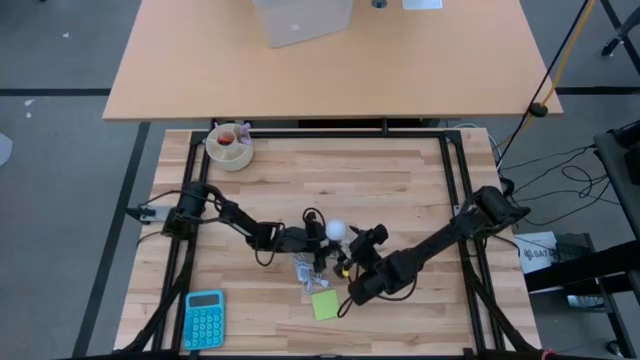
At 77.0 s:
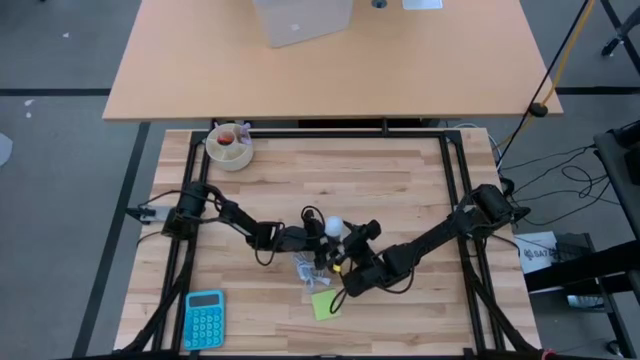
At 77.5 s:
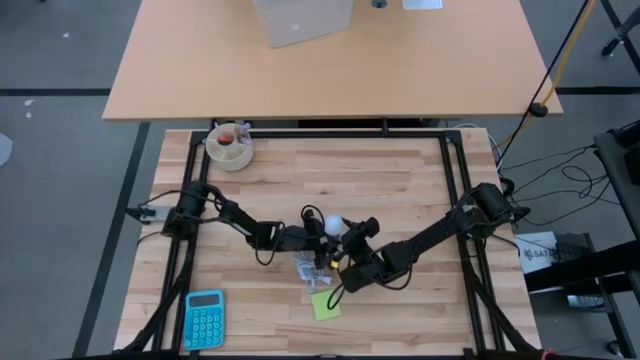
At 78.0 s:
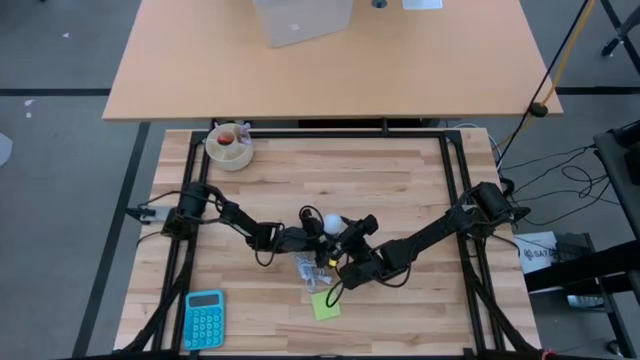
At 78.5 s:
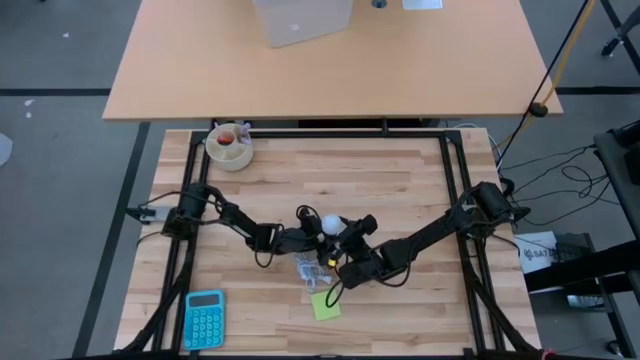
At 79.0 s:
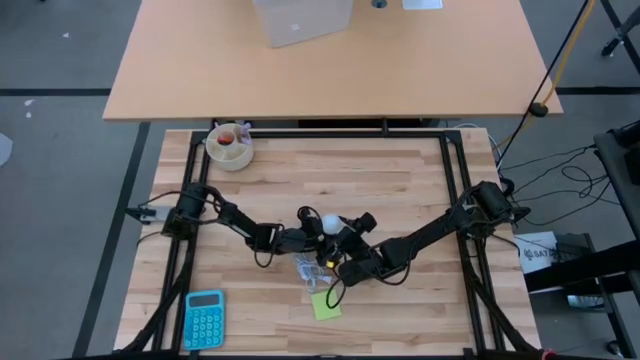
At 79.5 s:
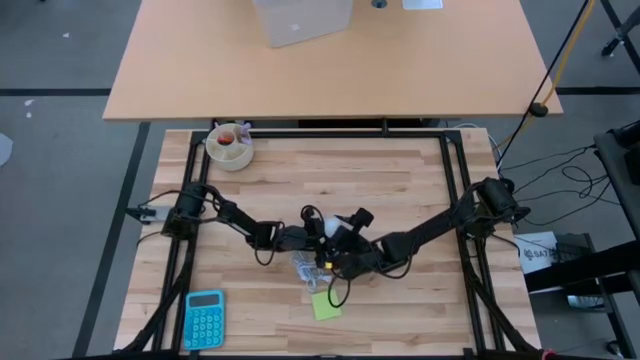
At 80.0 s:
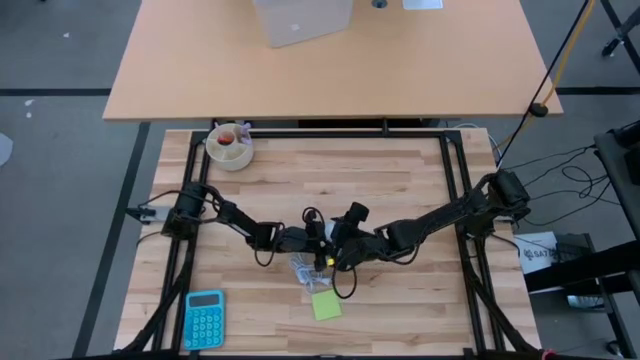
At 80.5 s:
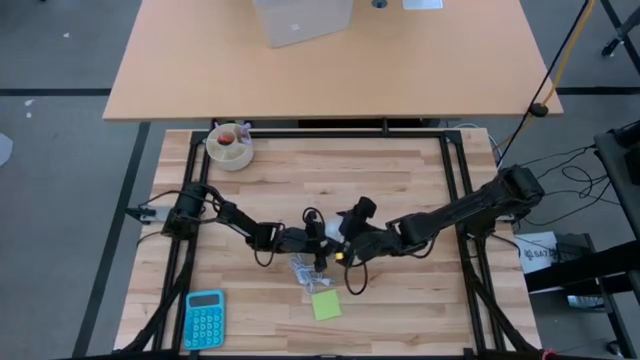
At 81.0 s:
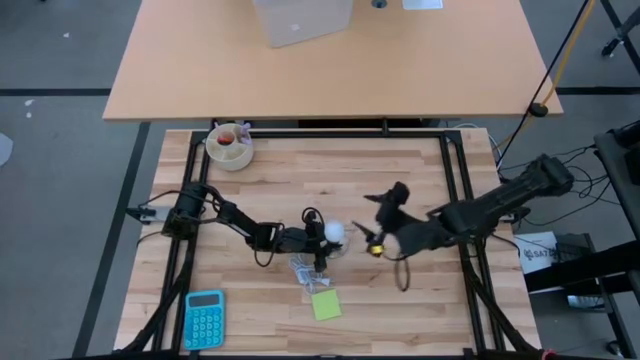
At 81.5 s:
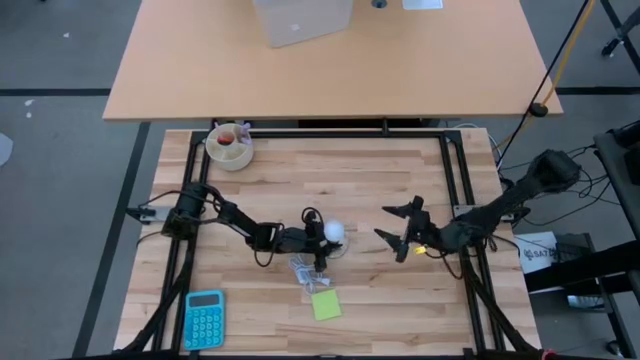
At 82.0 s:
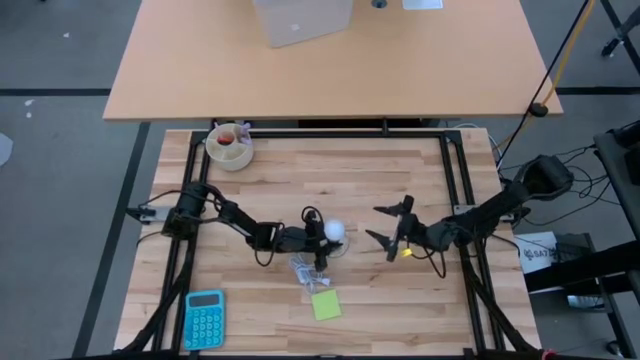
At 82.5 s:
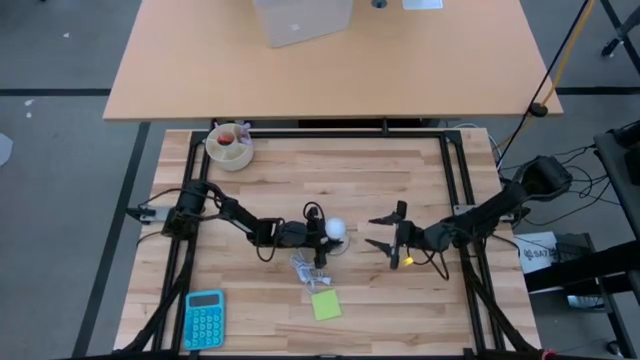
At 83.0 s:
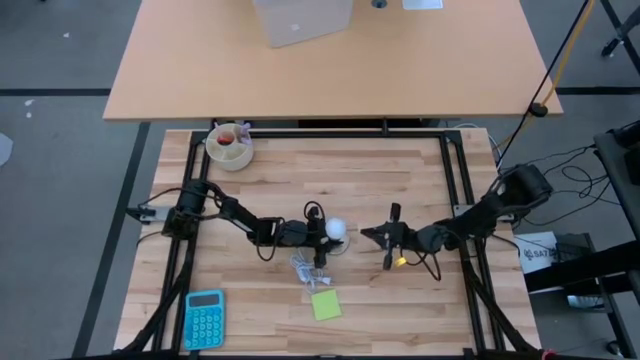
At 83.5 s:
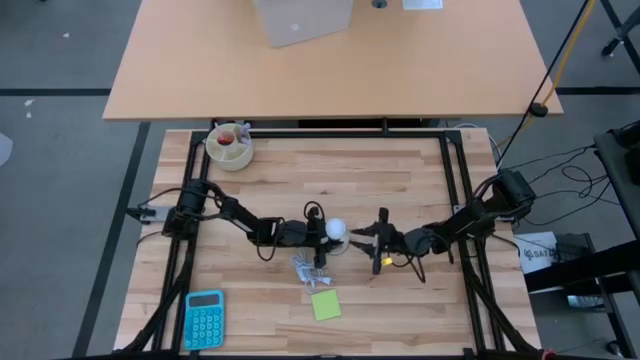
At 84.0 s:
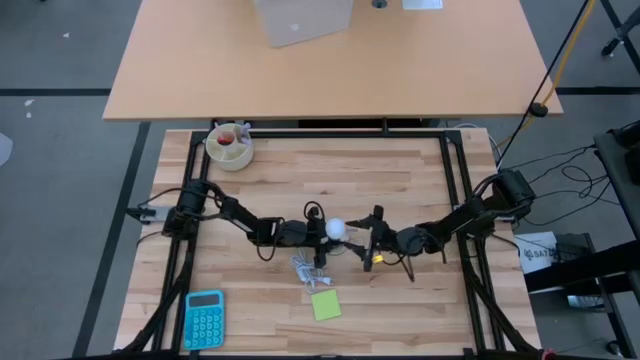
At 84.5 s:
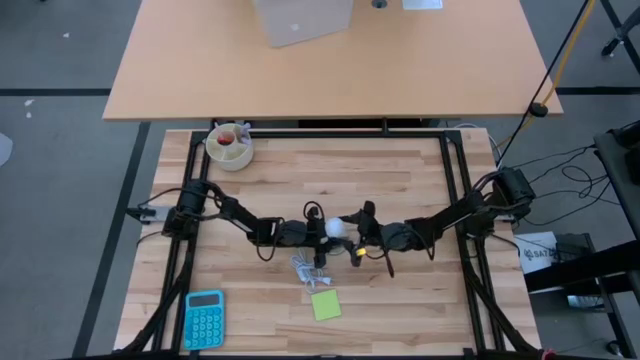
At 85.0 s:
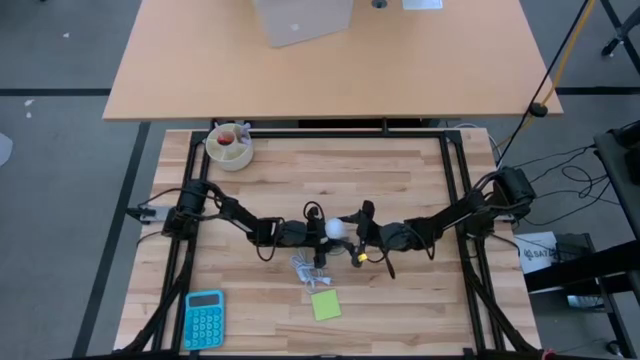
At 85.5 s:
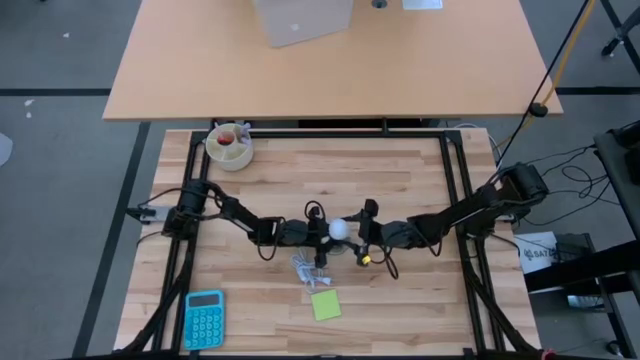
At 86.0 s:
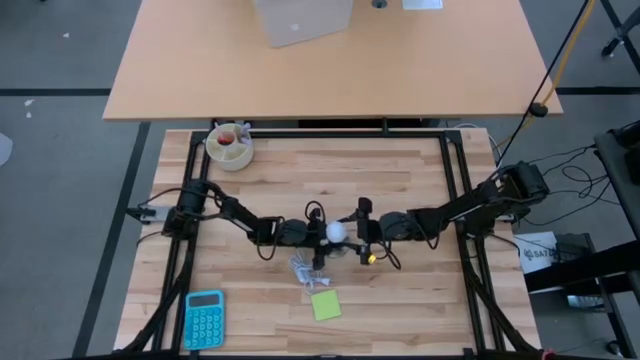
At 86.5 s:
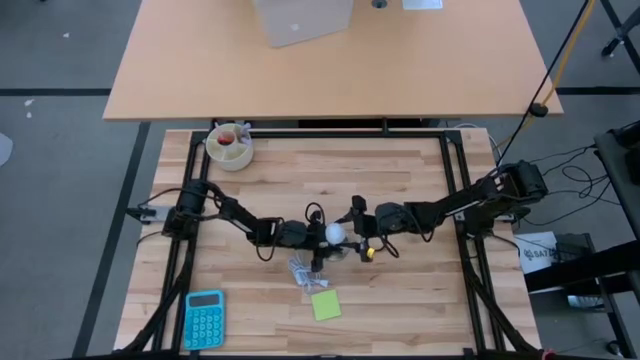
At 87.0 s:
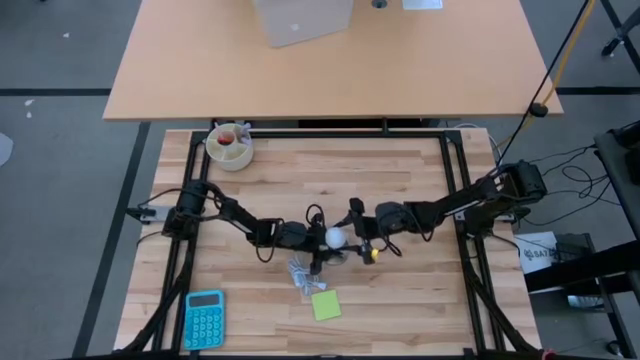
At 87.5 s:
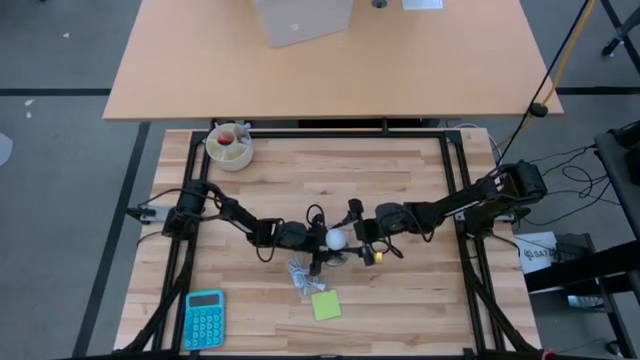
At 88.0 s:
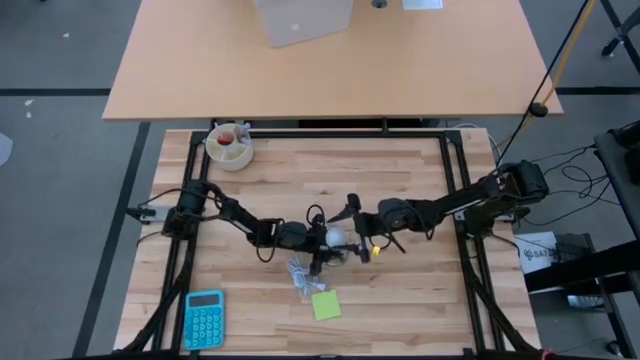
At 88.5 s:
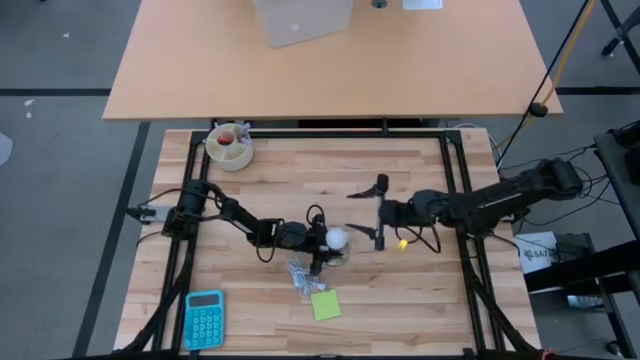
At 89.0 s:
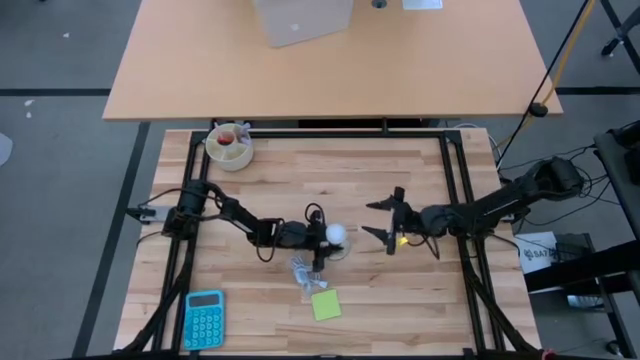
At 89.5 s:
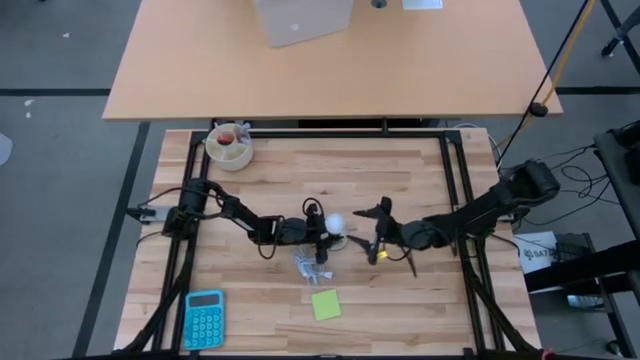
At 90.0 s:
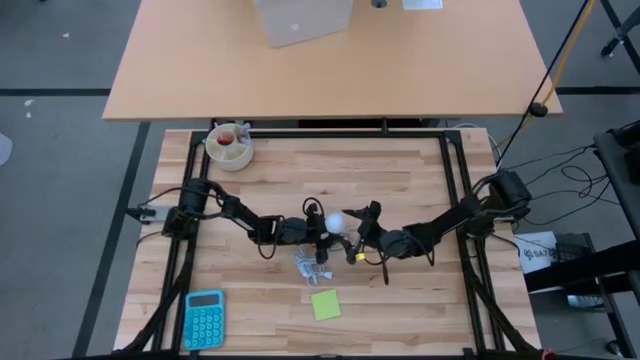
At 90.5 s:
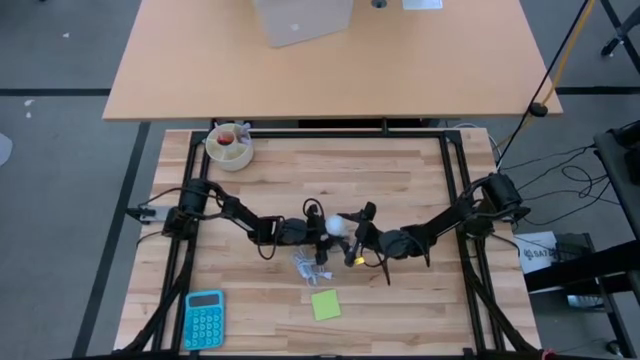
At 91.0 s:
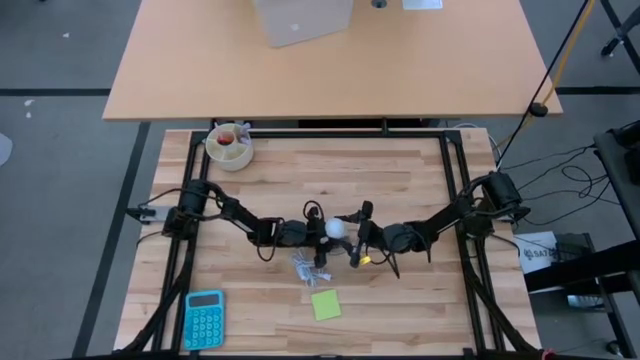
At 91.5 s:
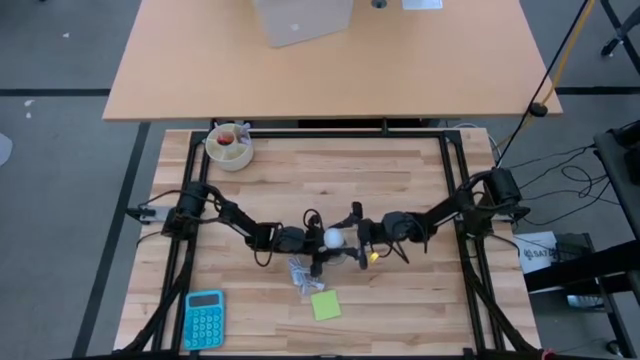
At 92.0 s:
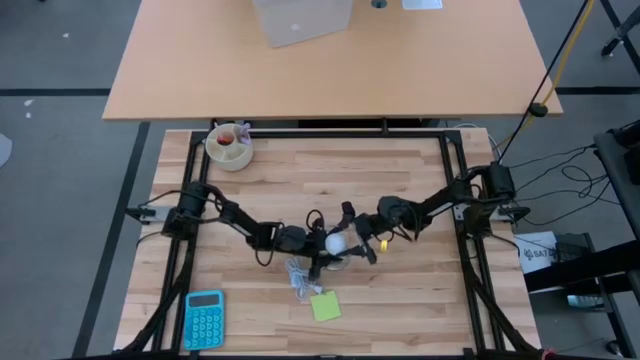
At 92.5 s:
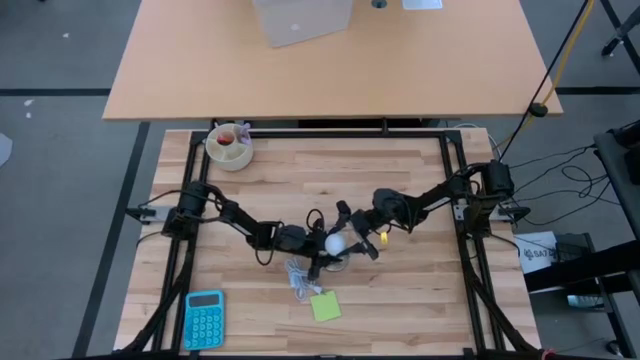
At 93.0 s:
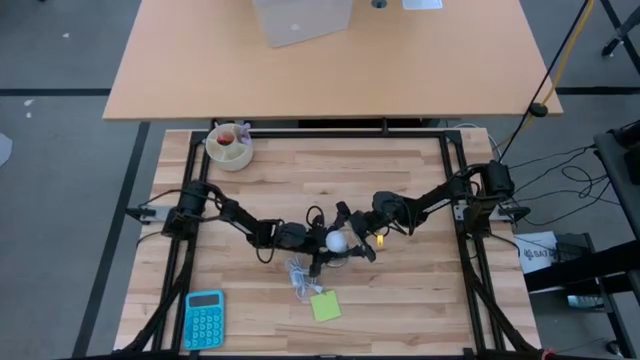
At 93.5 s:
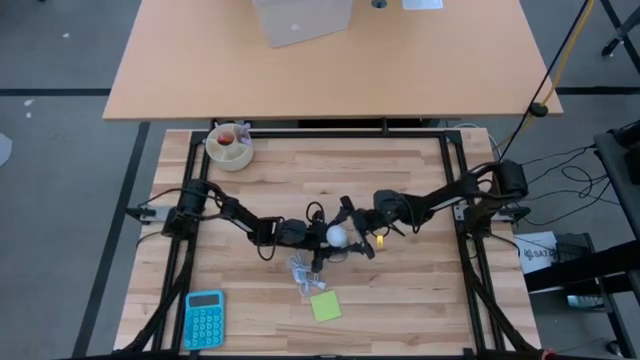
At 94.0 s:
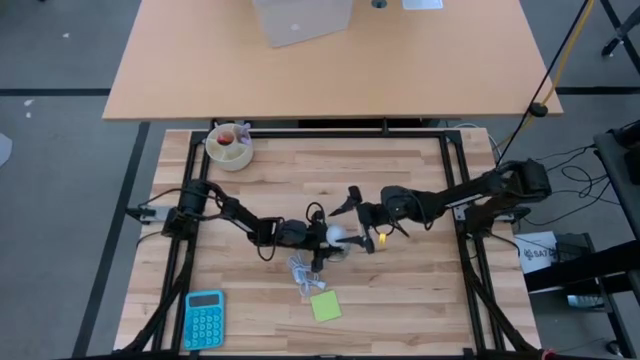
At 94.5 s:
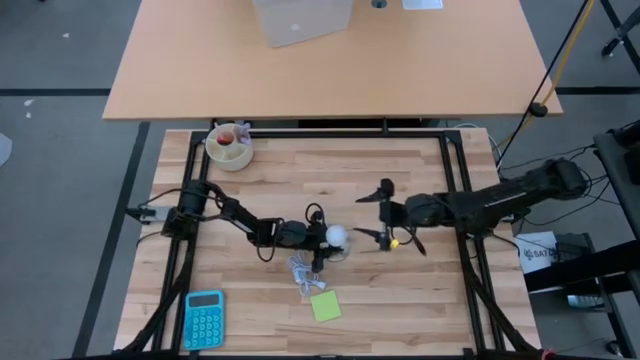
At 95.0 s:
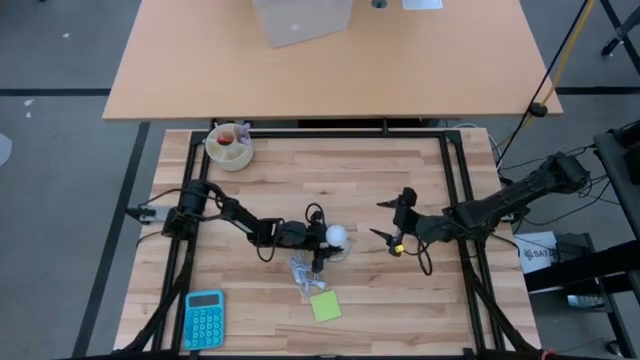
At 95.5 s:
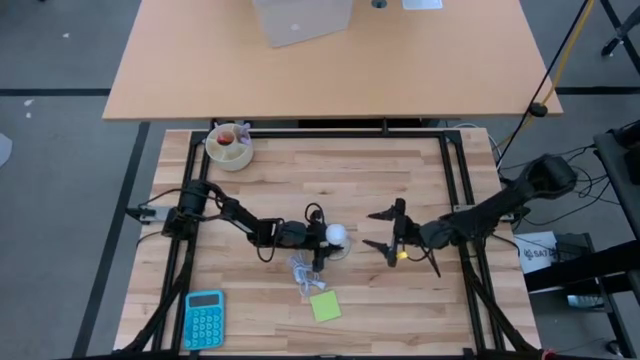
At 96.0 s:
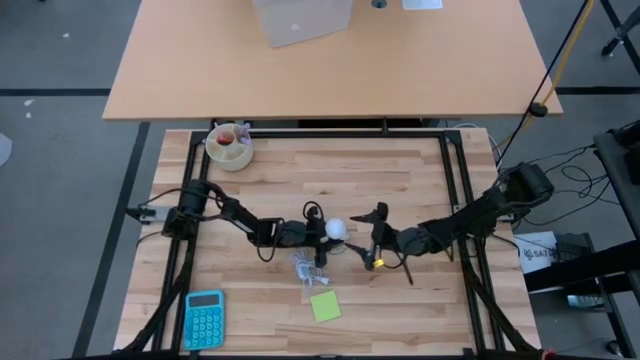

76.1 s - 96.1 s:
Task: Screw lightbulb
Remove the lightbulb from the lamp

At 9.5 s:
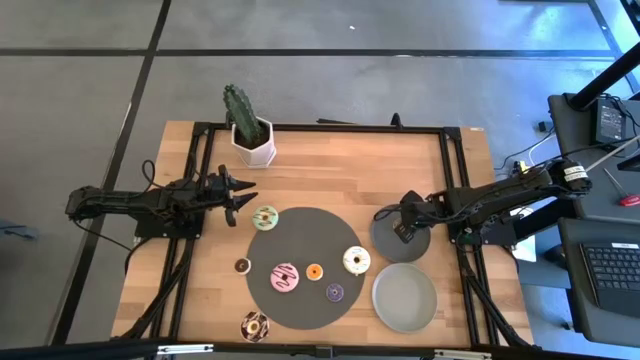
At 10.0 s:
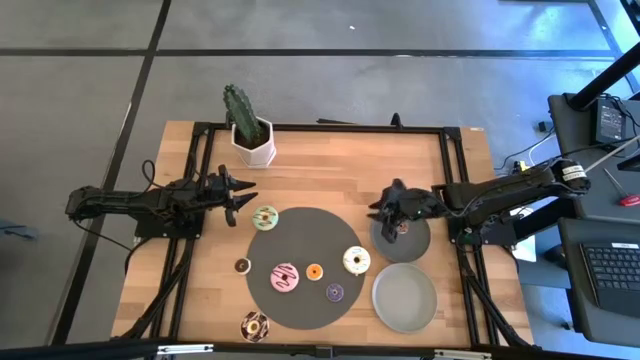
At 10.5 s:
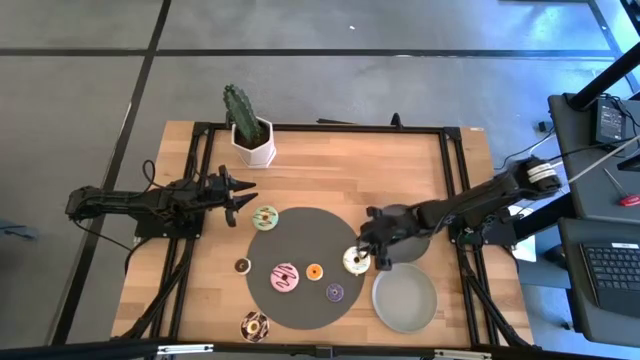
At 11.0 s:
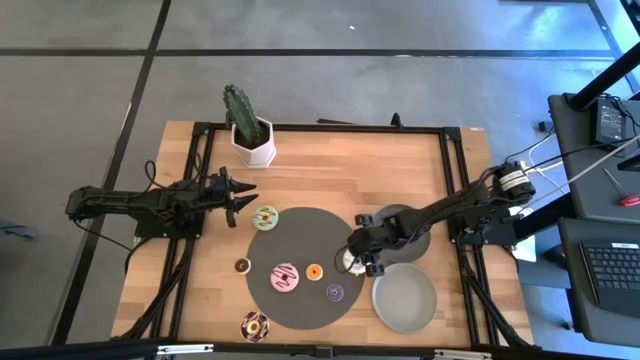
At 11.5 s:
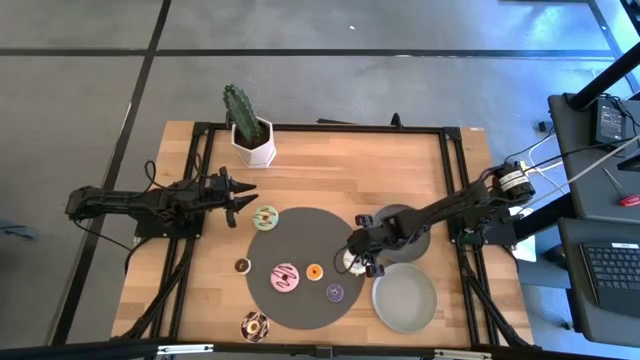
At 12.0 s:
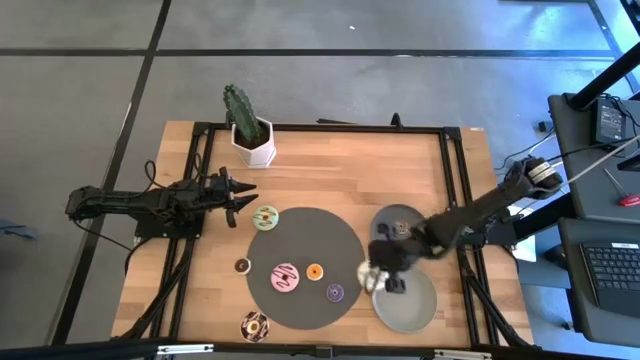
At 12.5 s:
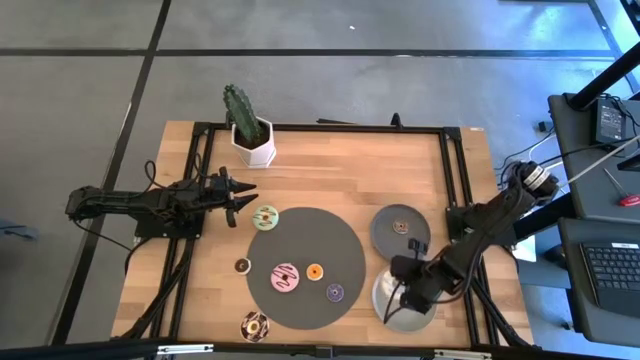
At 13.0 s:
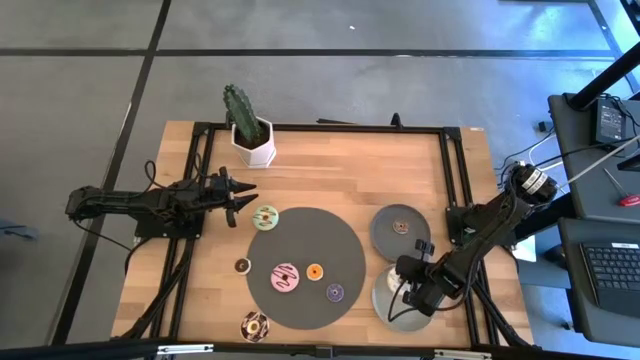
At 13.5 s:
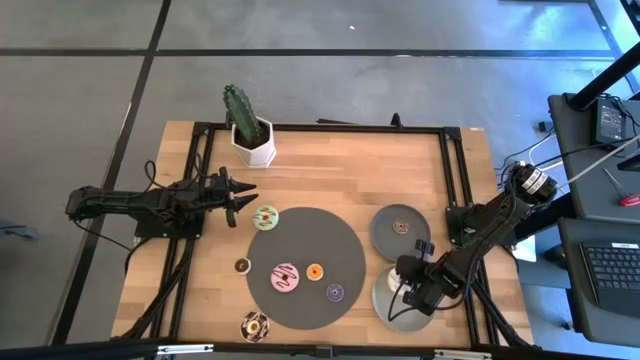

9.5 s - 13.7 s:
Task: Pick & Place donuts
Put the large white donut on the light gray plate
